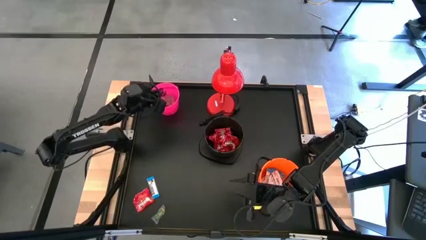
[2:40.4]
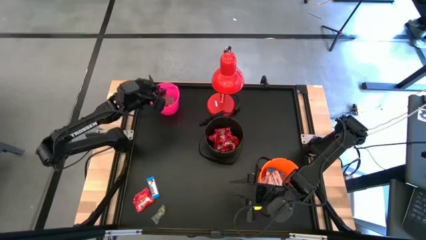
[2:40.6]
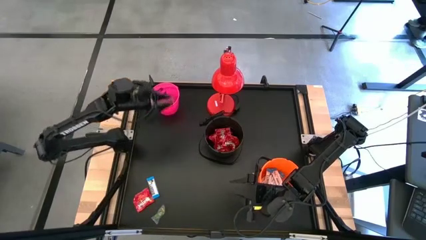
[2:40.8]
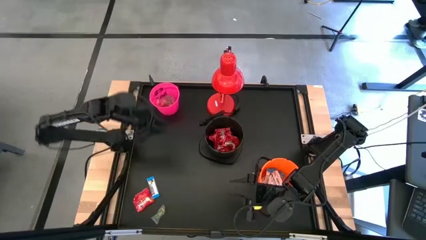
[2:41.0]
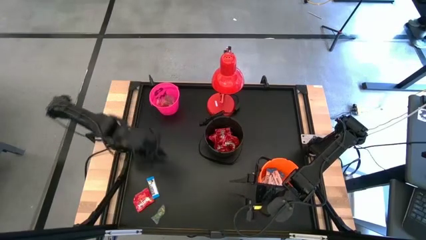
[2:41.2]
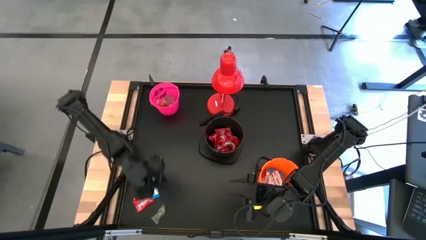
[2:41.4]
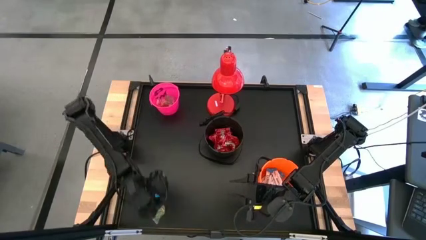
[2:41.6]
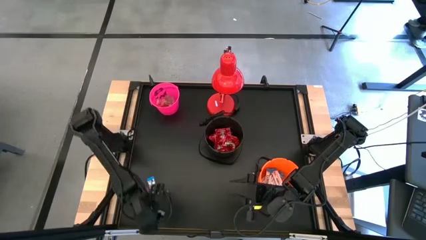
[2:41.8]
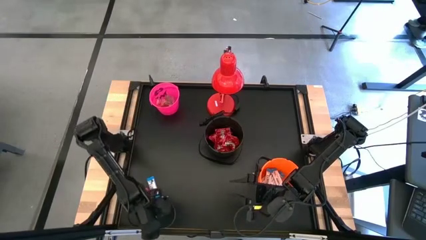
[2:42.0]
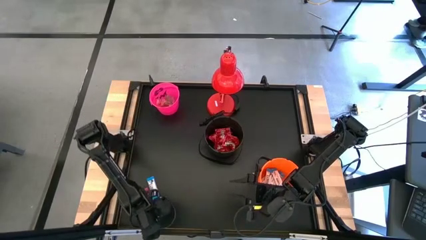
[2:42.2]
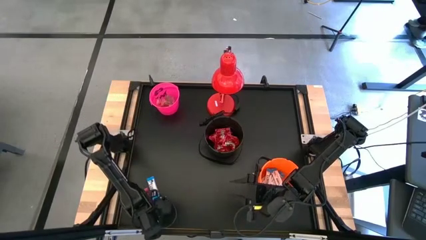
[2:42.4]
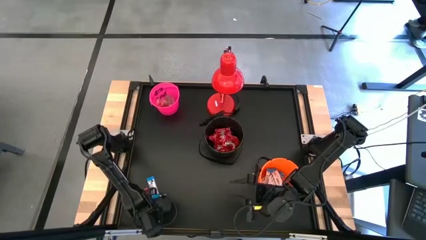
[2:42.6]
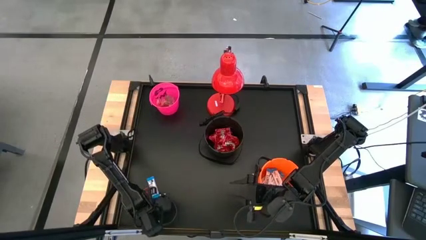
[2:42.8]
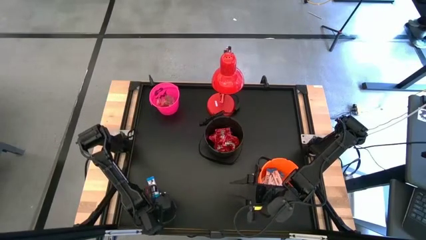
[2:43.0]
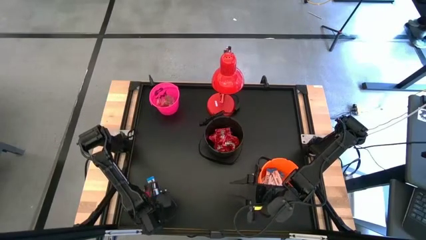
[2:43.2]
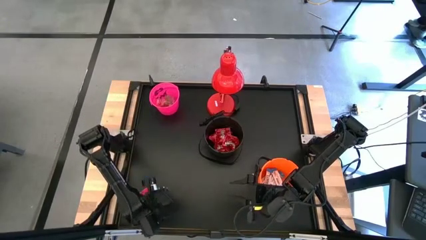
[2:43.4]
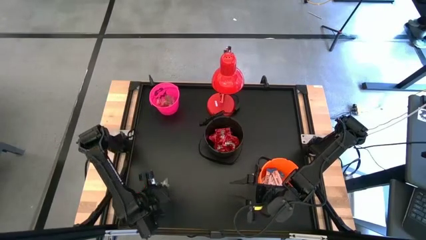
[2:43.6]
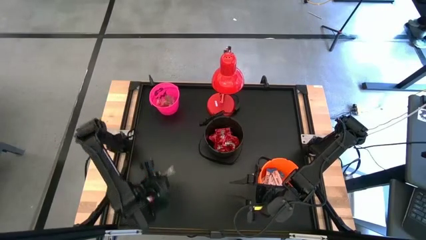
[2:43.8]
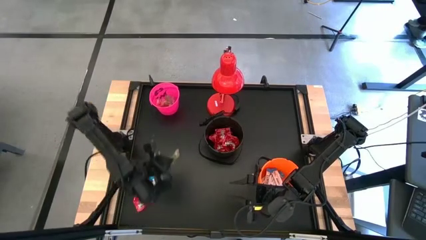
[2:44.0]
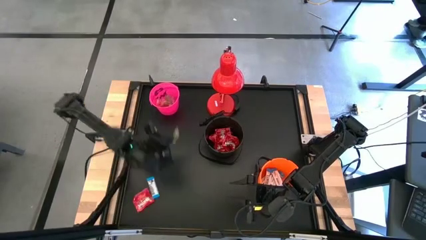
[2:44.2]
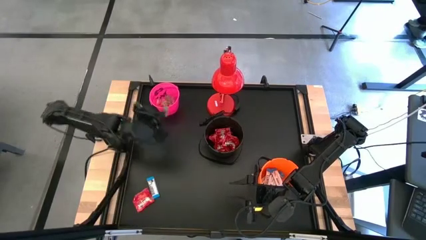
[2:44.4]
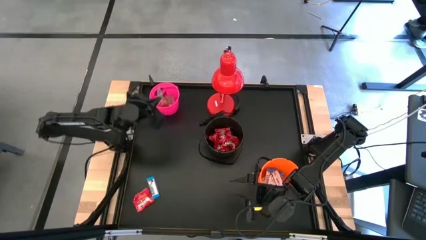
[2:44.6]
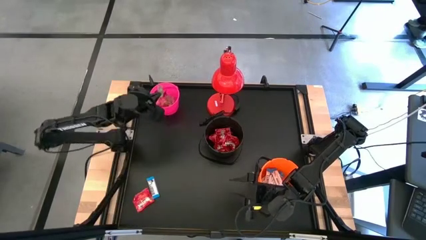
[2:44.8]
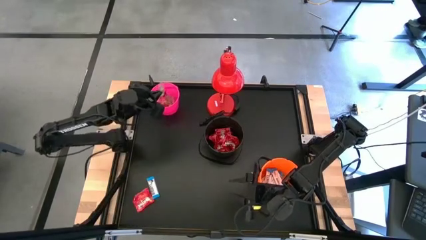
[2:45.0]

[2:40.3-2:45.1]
Task: Organize candy in baskets
Put the green gummy into the pink bucket

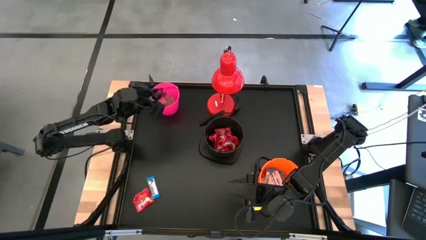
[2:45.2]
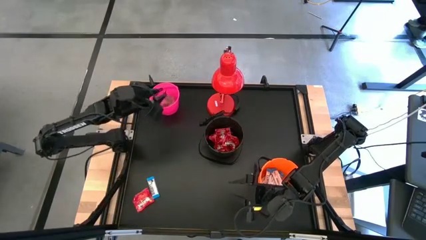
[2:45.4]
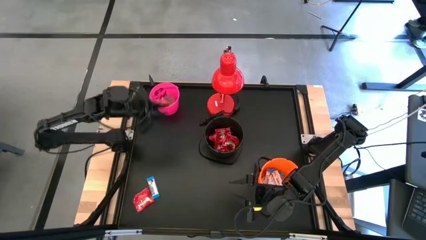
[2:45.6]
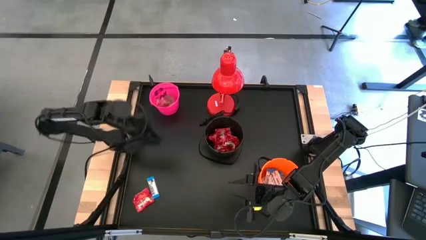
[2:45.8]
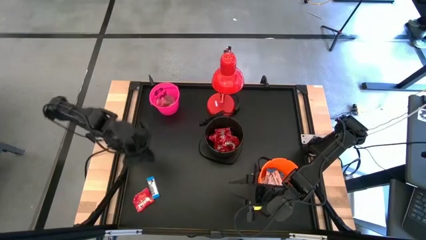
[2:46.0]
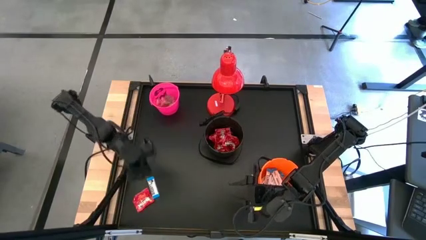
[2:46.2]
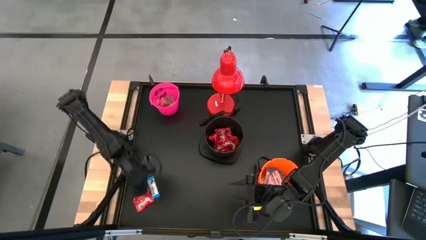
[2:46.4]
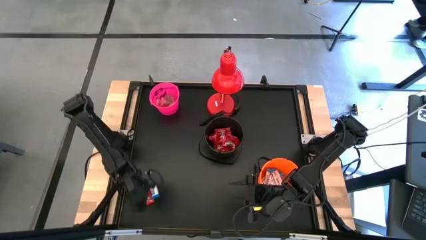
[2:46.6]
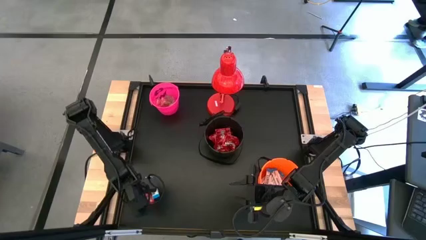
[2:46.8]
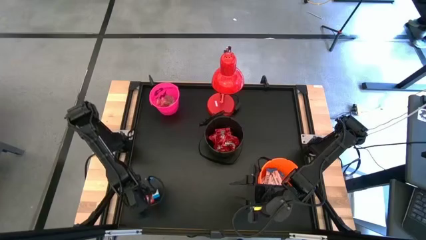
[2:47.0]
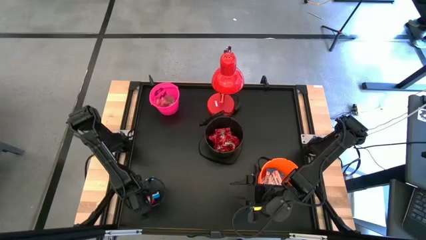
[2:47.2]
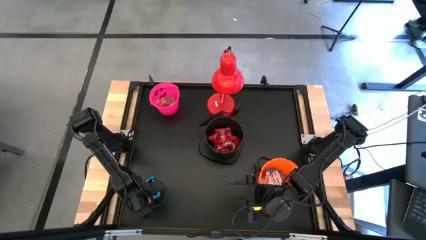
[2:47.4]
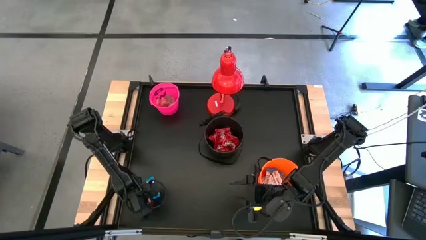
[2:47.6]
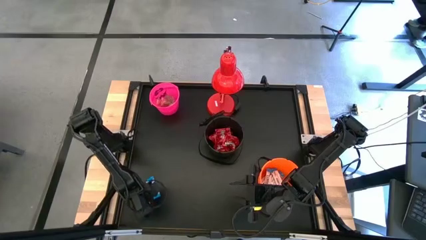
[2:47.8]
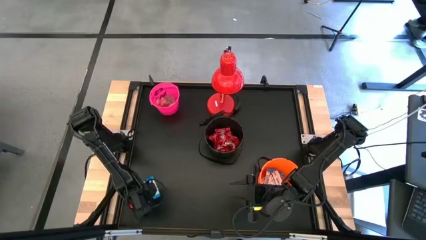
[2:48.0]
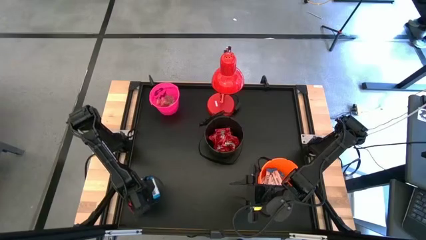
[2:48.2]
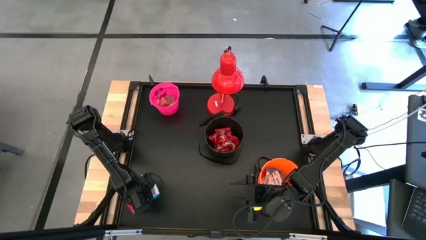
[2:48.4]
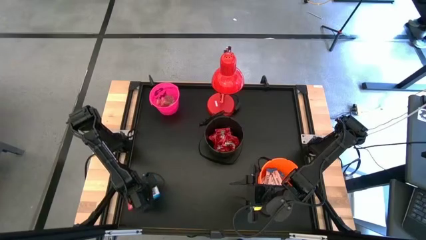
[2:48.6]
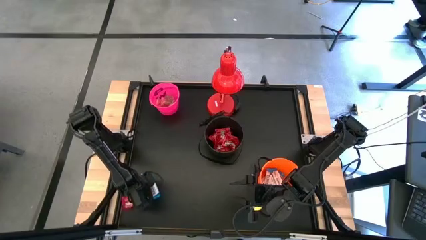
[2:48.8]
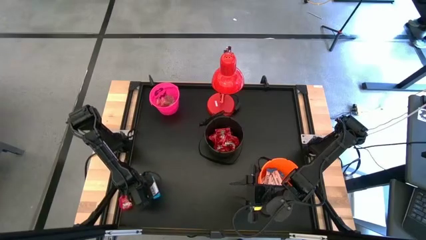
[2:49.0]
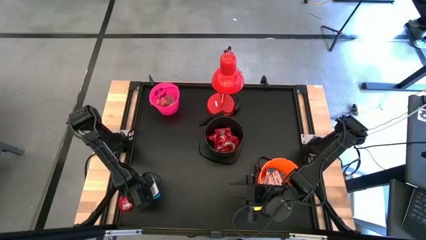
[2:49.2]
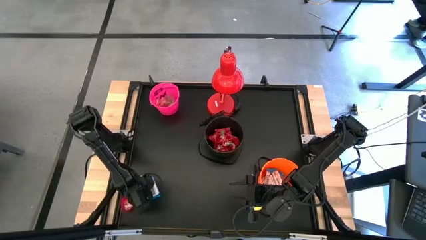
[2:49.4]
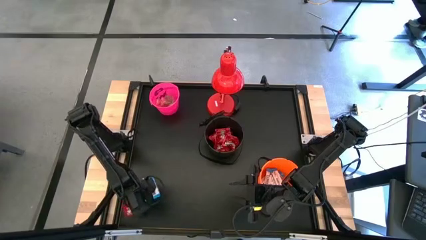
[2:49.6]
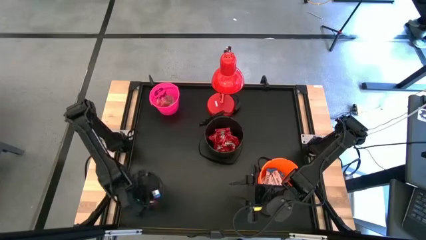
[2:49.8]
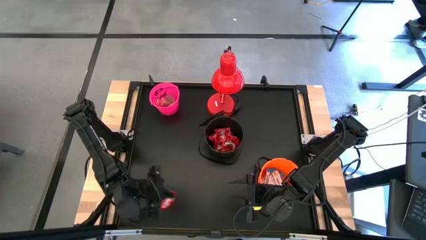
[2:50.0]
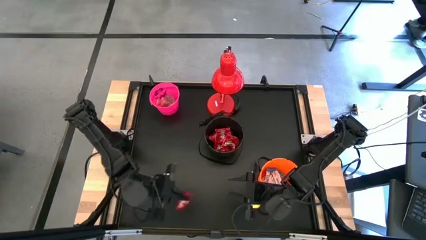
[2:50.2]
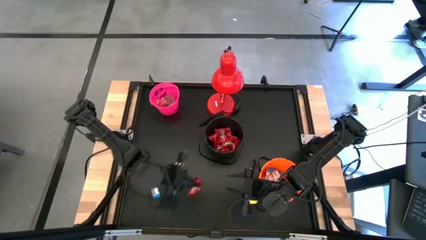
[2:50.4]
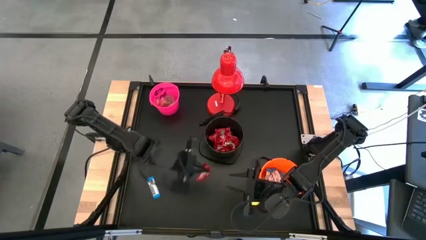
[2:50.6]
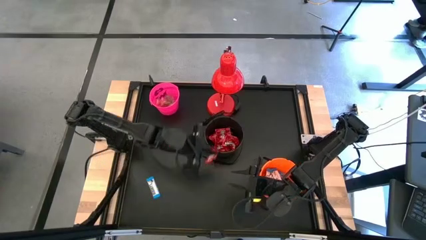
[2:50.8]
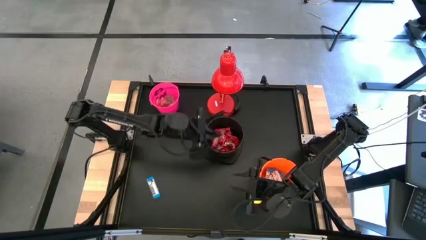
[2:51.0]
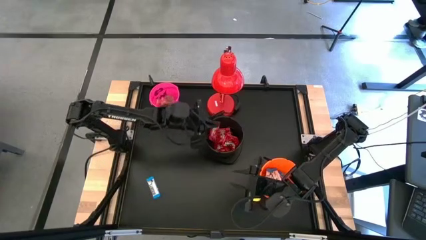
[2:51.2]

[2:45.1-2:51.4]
Put the red candy into the black bucket
